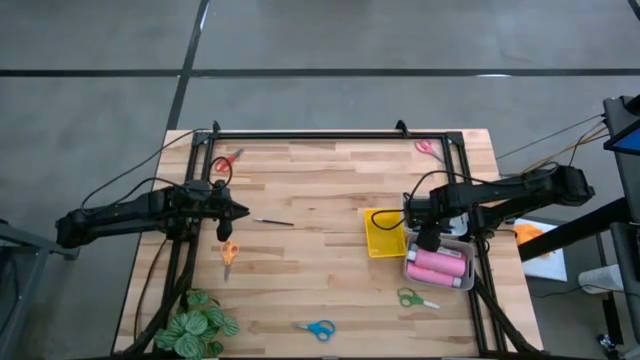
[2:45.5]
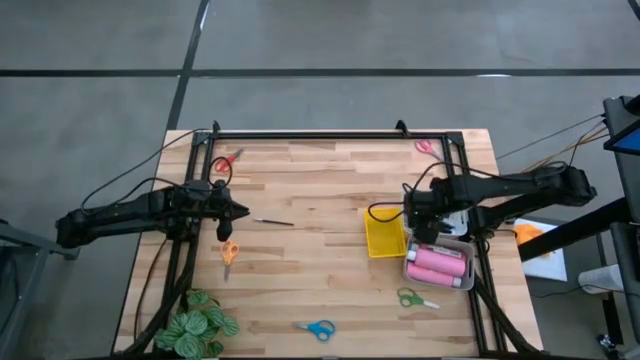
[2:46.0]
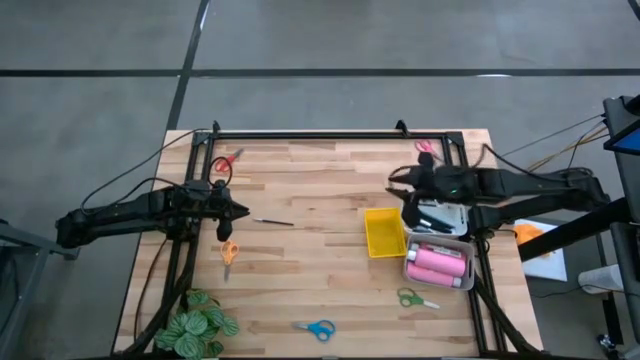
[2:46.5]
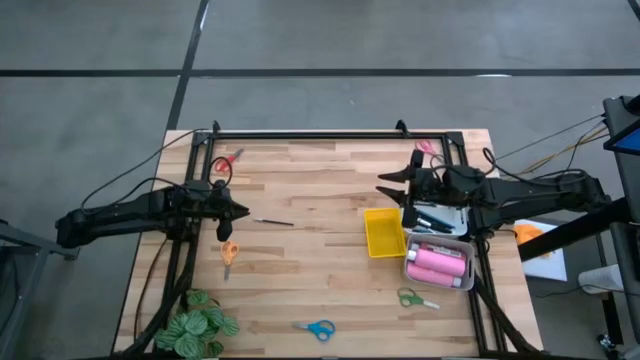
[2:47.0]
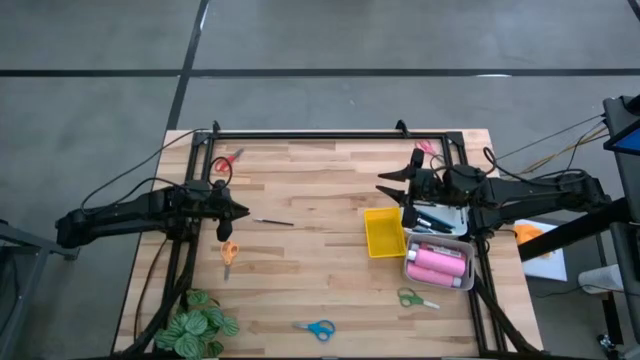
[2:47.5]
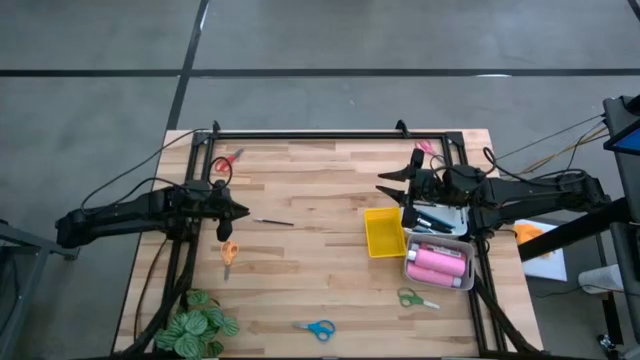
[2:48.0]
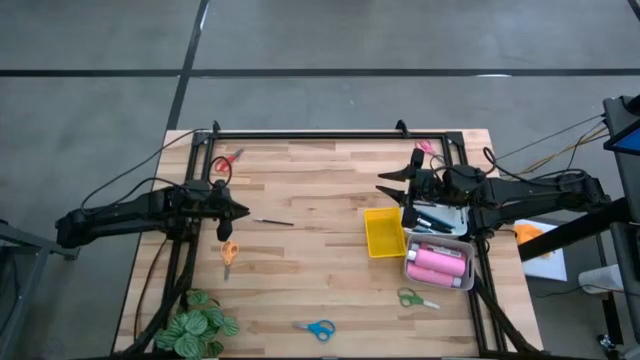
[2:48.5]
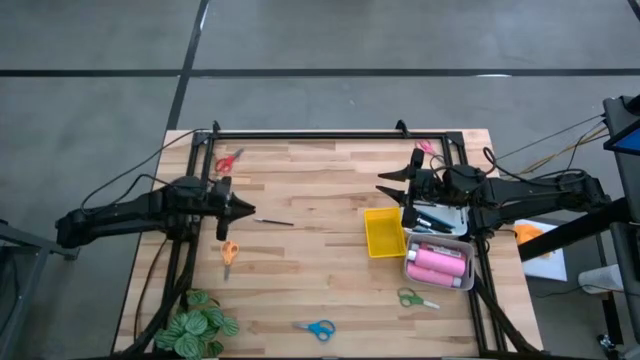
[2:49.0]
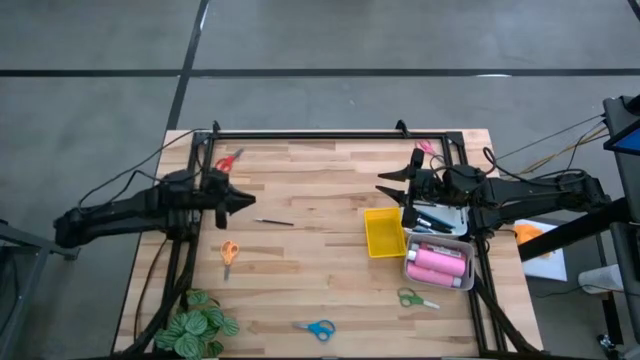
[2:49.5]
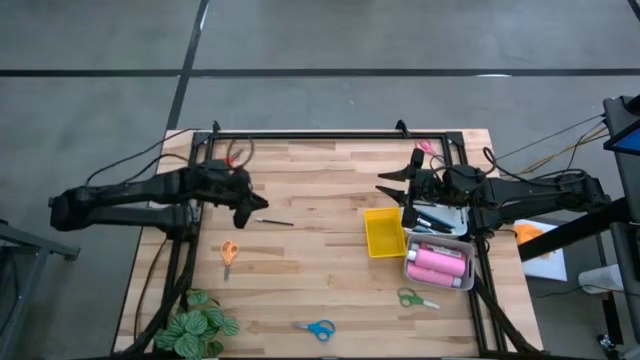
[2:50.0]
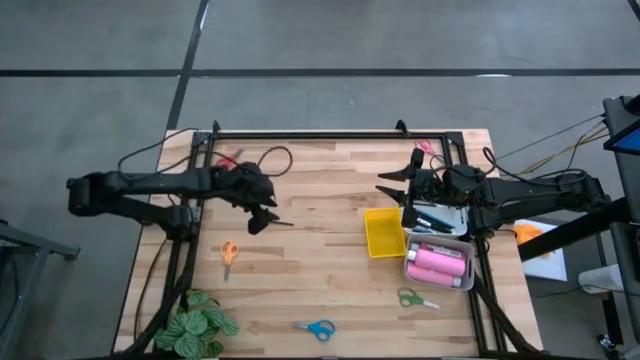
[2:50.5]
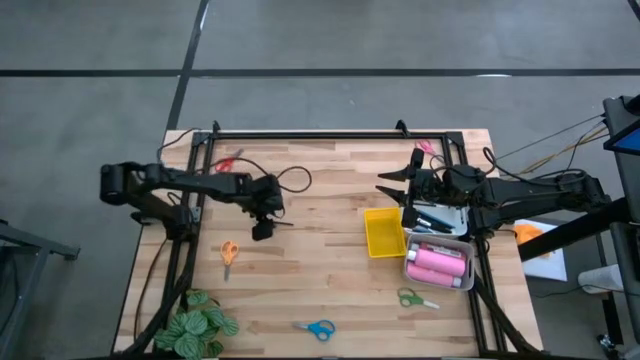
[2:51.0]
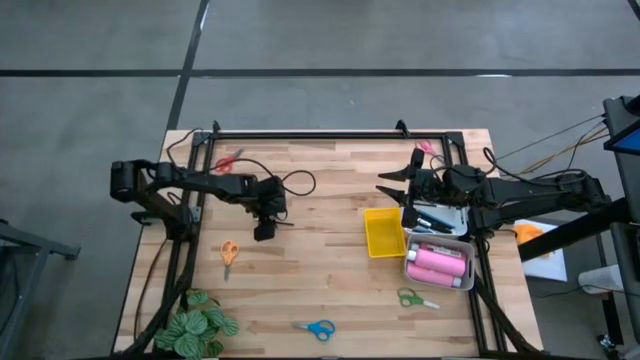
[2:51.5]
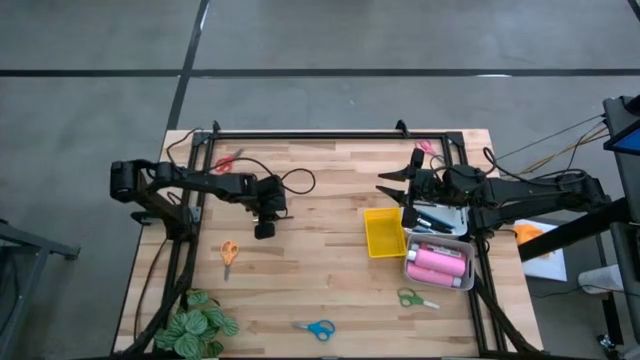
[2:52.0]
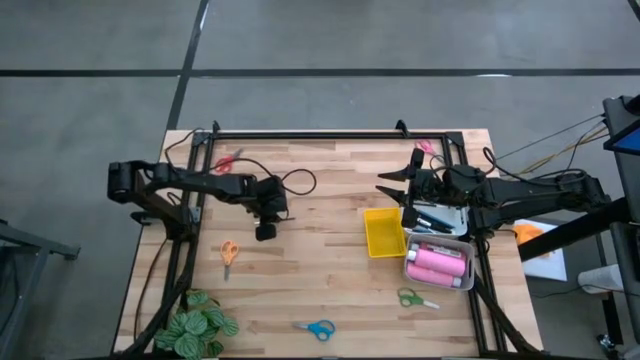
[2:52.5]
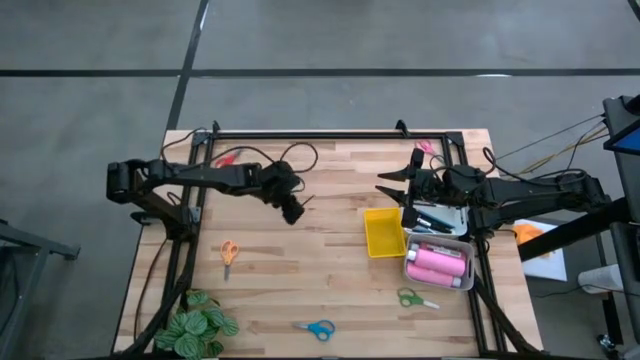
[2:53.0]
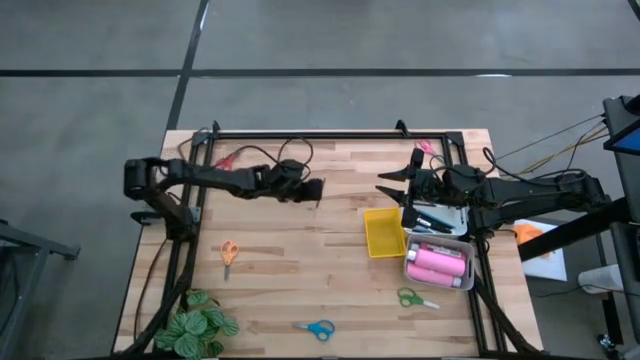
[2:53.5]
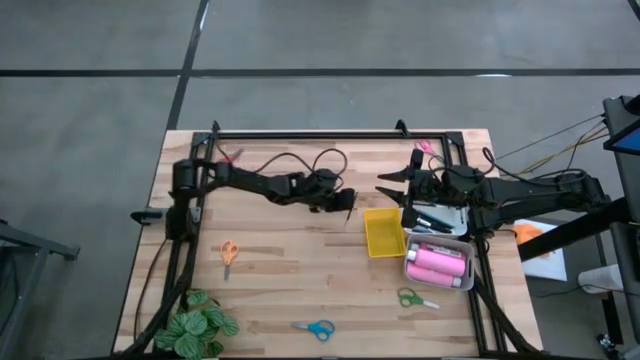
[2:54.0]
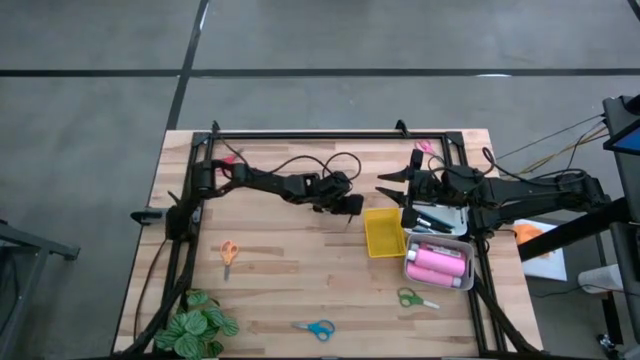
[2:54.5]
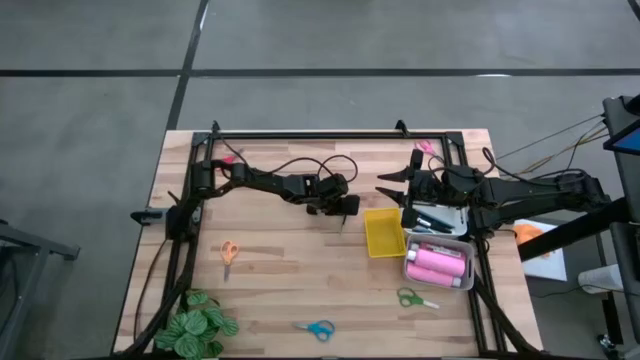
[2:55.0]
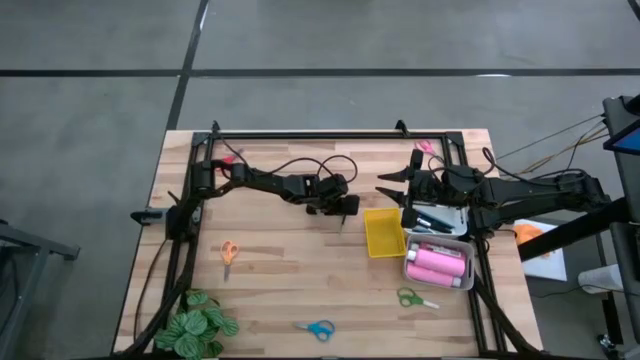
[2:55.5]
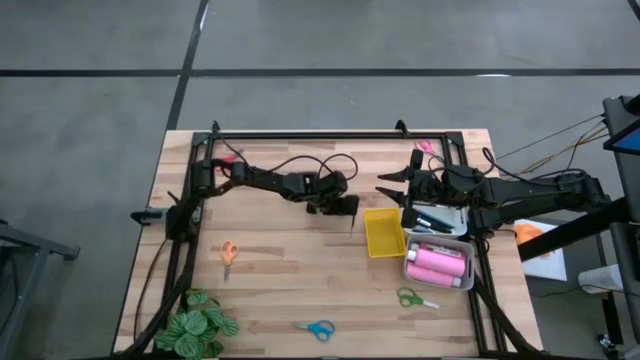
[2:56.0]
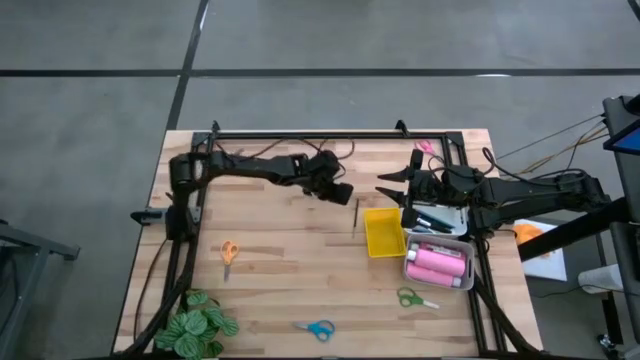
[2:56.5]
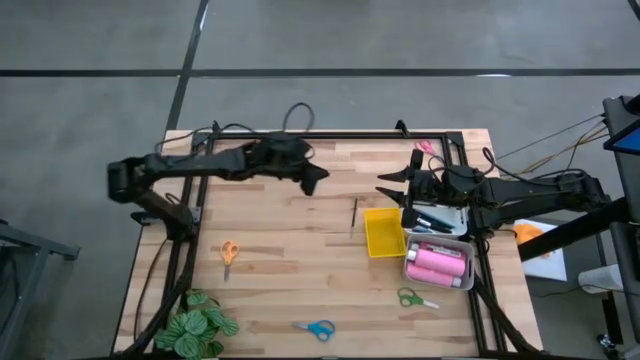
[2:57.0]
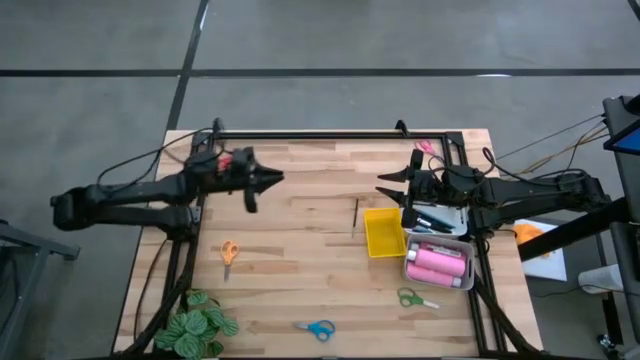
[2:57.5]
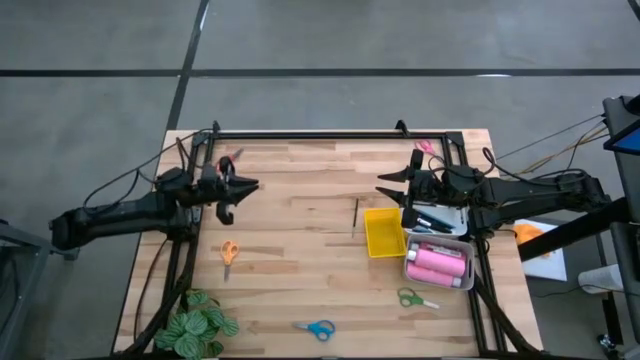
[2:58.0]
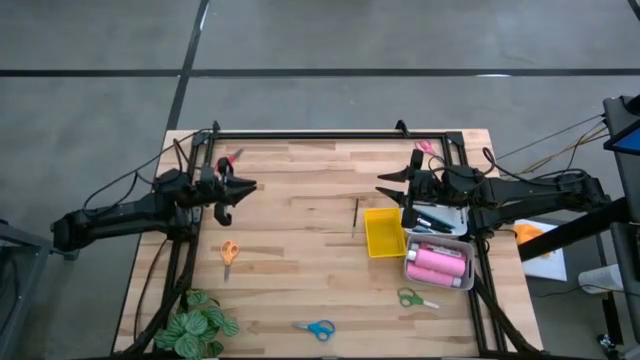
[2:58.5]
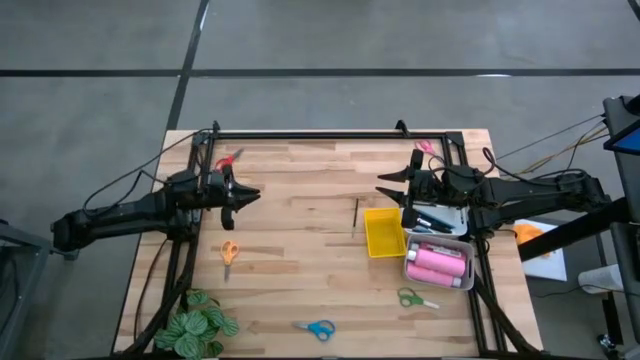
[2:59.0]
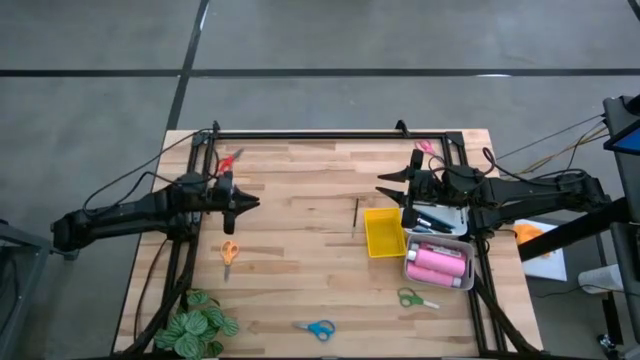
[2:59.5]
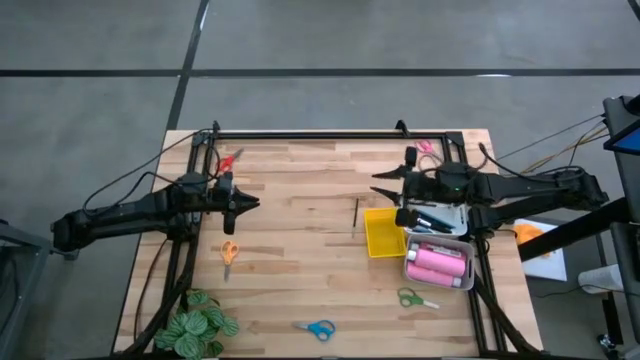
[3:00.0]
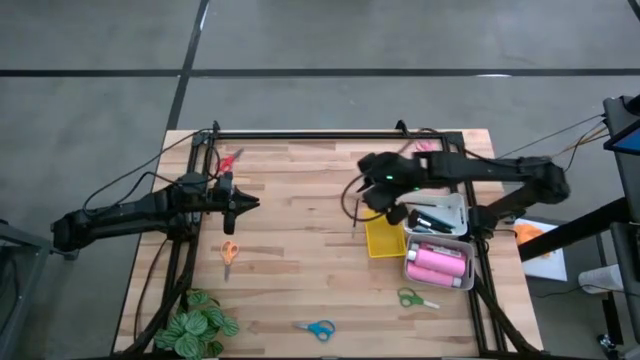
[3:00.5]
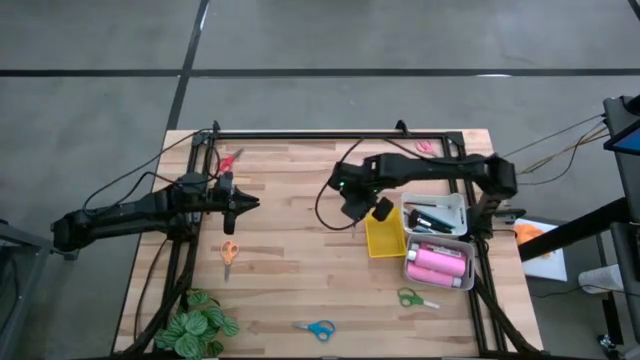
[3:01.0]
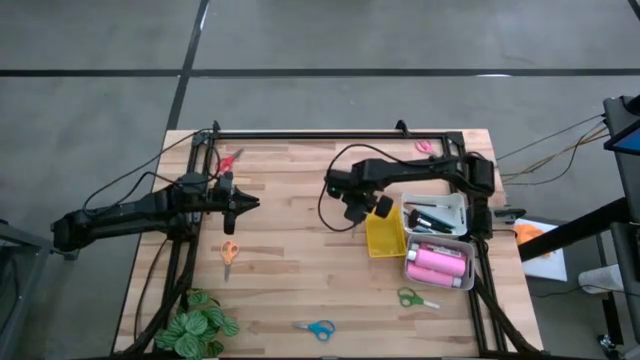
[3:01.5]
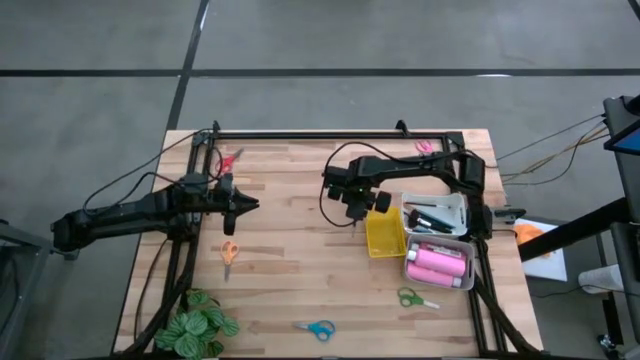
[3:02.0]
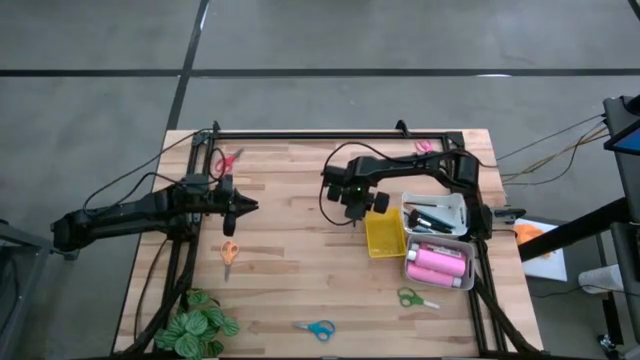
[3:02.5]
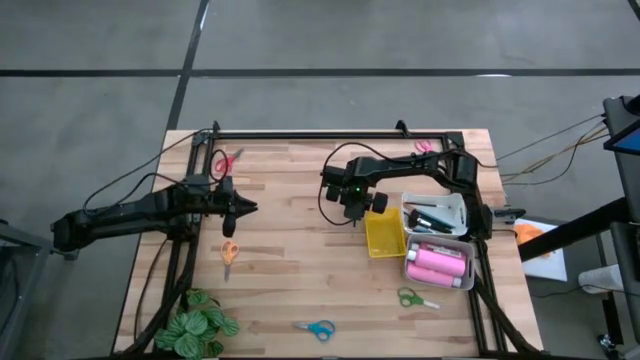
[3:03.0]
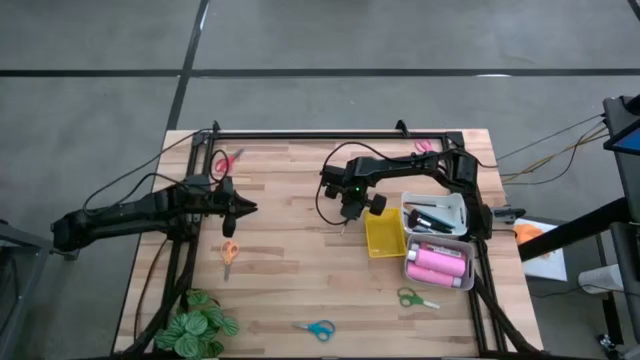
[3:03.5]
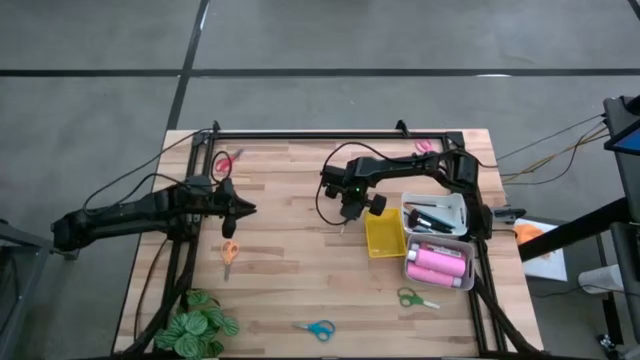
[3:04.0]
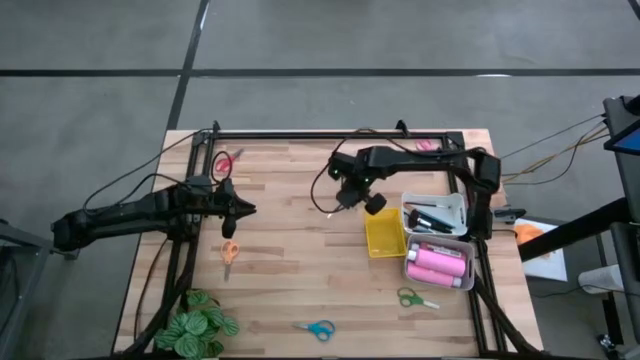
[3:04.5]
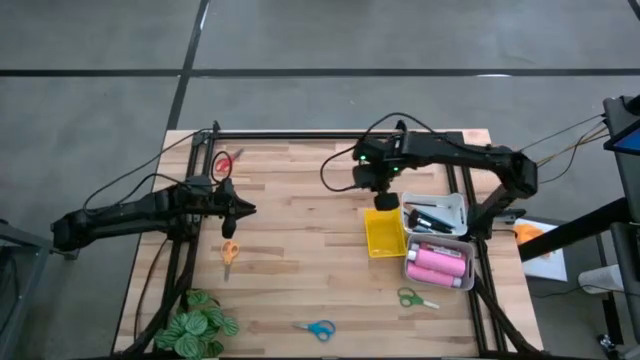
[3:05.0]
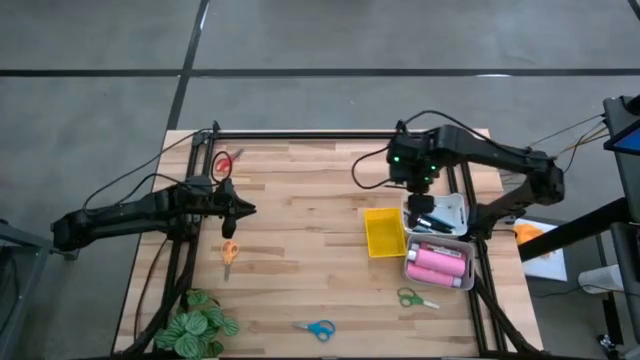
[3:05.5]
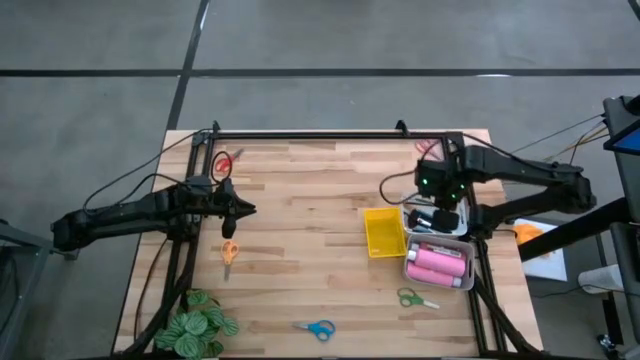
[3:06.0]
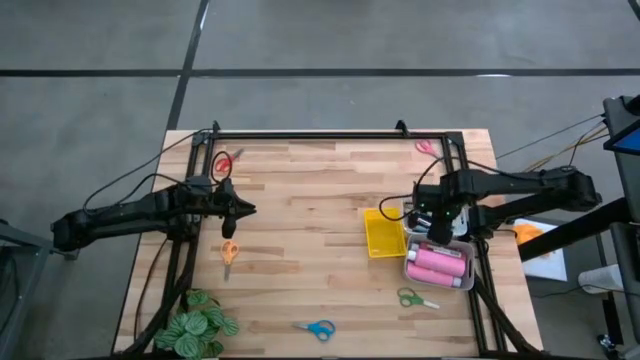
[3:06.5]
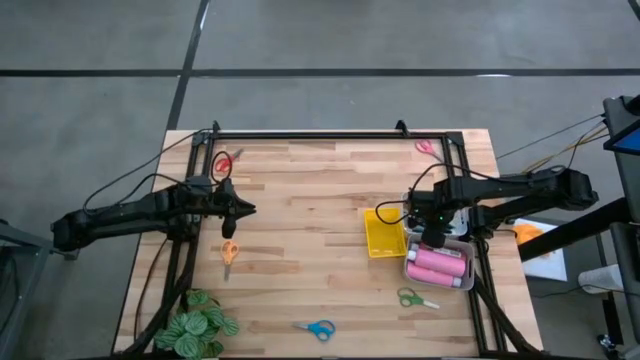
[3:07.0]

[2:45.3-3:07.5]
Task: Pick & Place Paint Supplies
Put the black paint brush into the white bin
